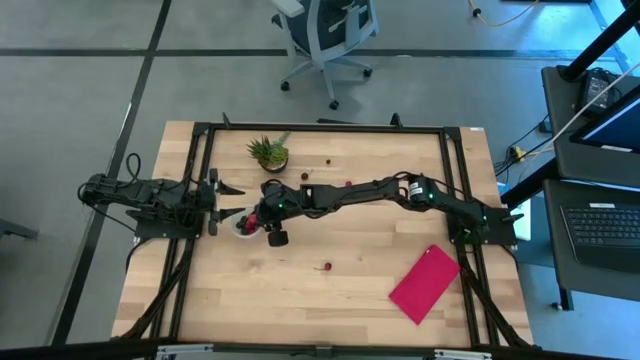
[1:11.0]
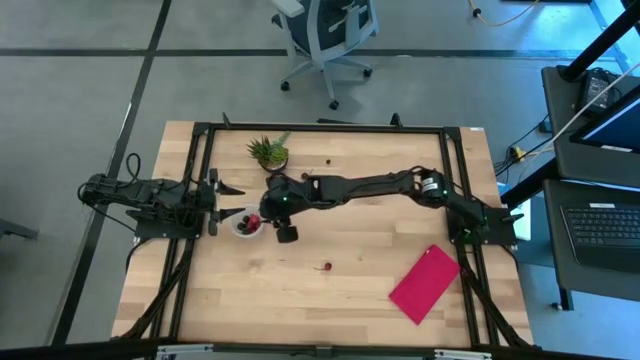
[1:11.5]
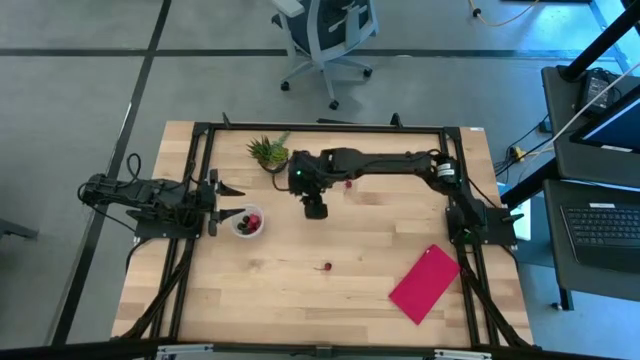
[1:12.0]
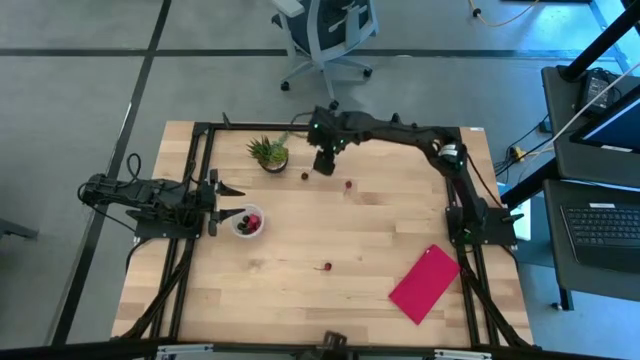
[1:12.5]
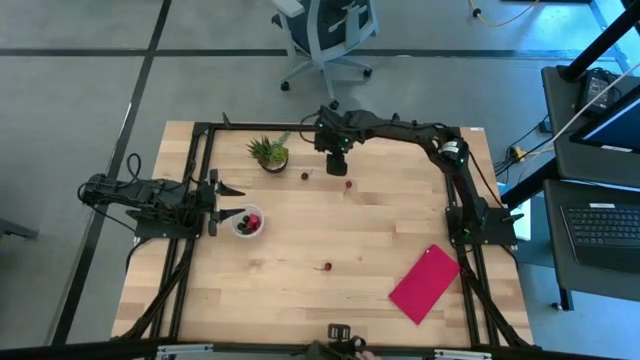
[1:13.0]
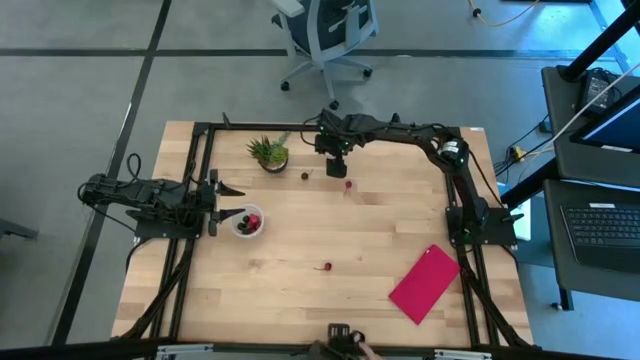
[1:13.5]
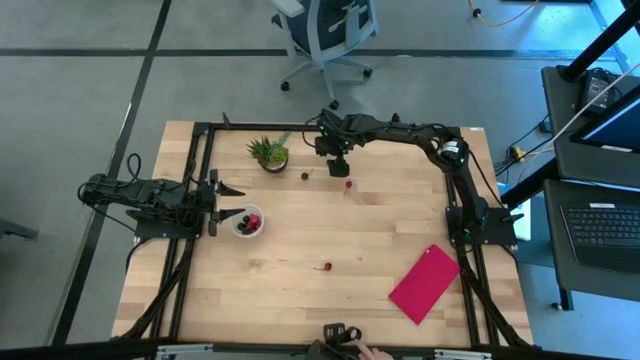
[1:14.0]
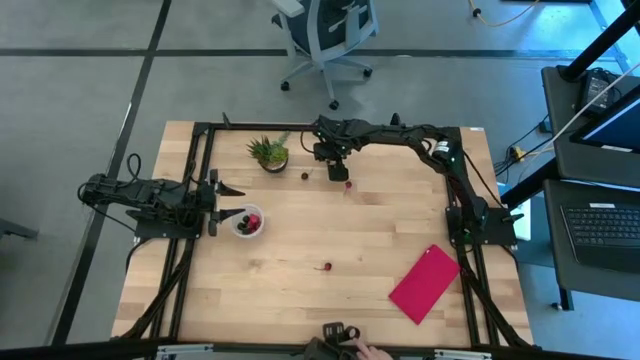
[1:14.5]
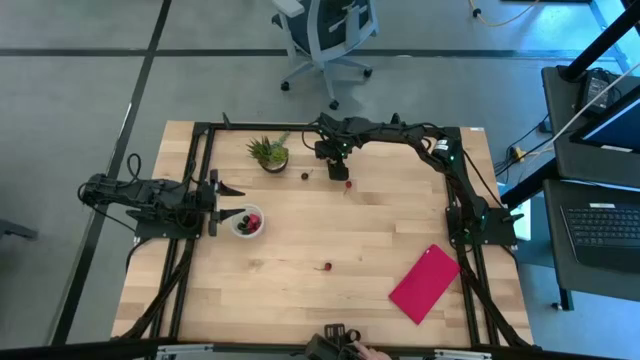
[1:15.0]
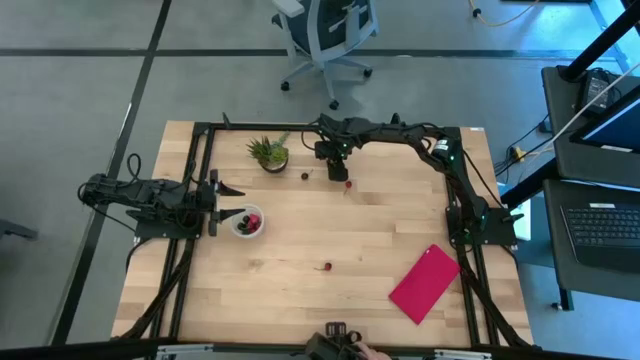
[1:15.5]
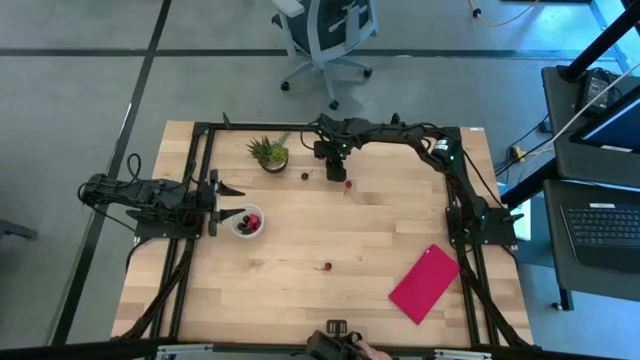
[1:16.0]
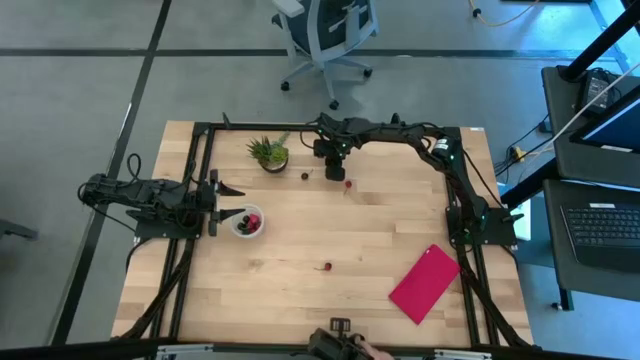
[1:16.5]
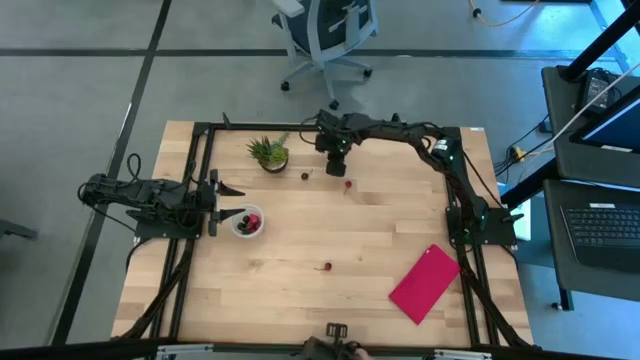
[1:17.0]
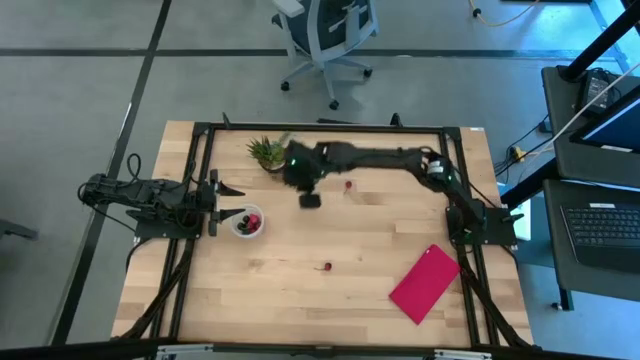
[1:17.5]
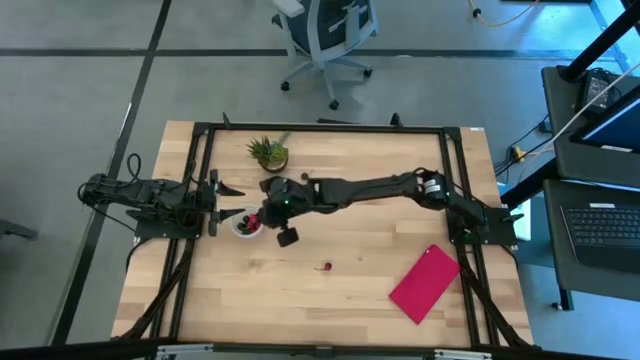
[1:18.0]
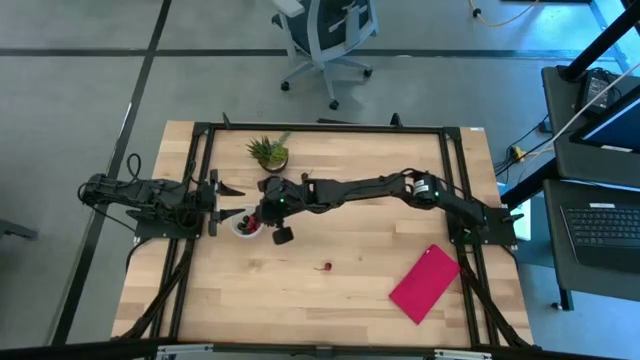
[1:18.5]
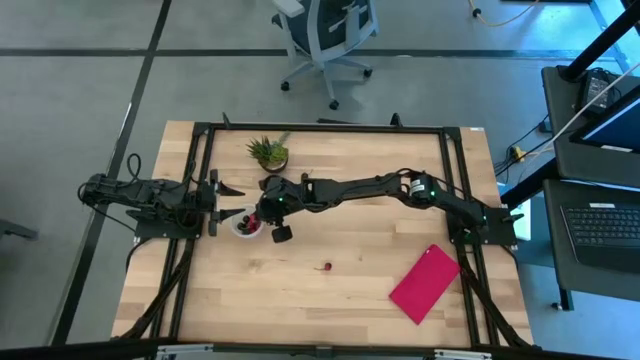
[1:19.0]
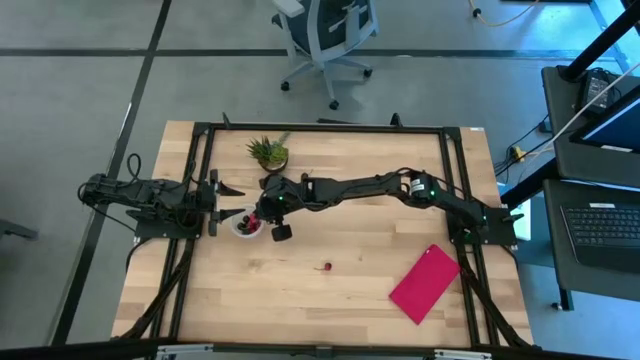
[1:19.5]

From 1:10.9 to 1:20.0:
Task: Pick and placing Produce into tupperware
Put the blueberry into the transparent container

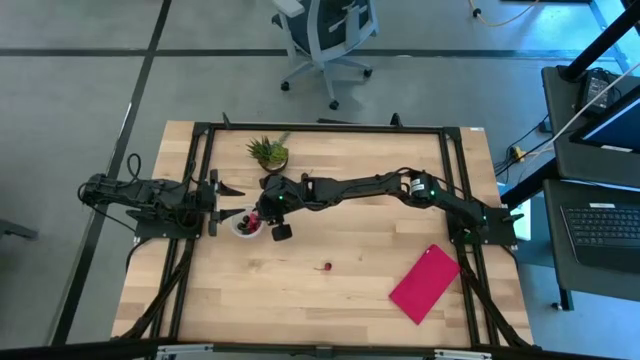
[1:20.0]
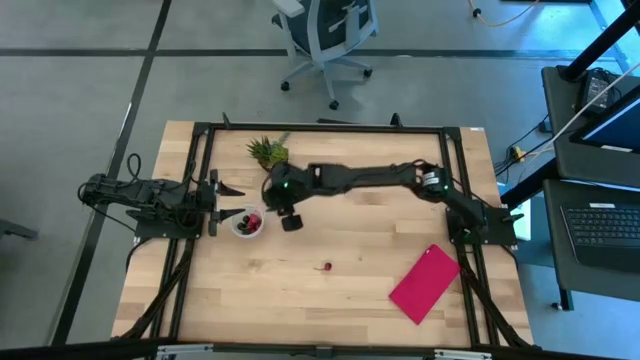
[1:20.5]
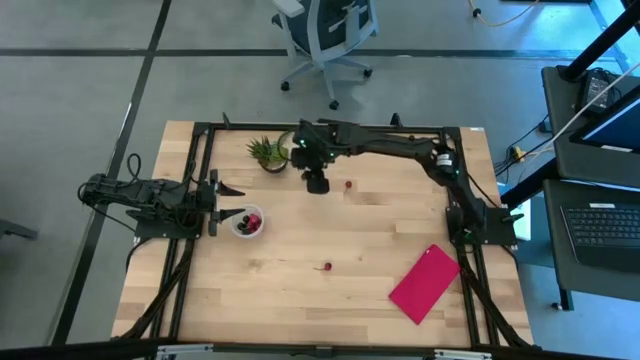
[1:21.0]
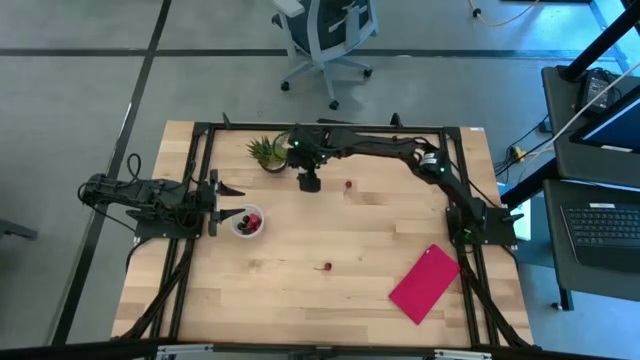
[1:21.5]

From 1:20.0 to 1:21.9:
Put the black cherry into the transparent container

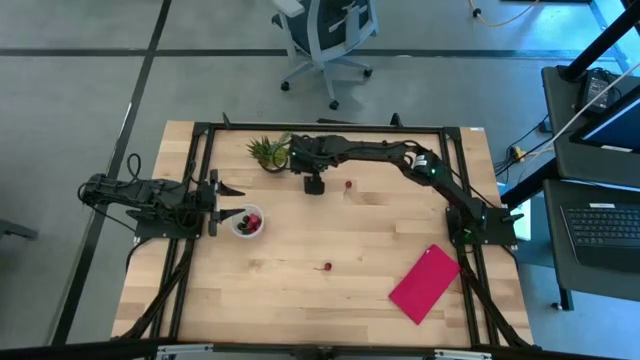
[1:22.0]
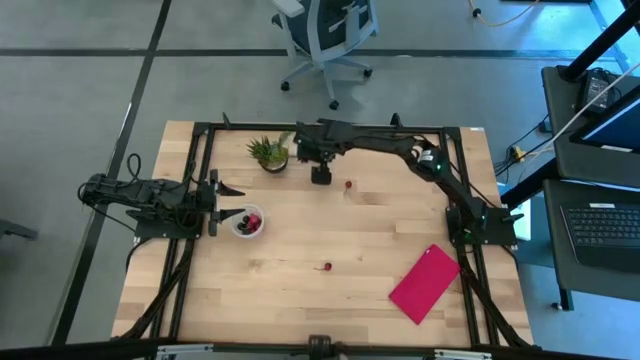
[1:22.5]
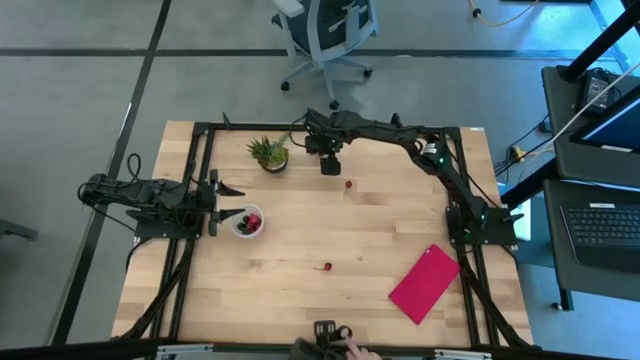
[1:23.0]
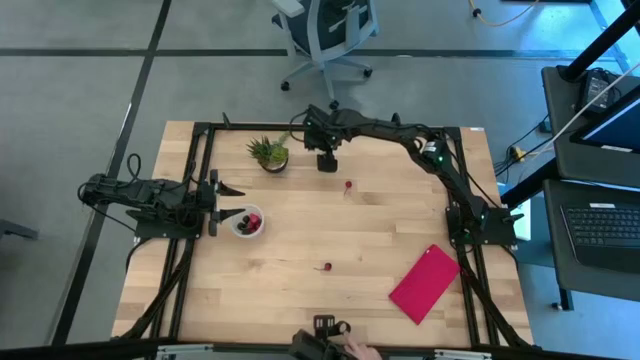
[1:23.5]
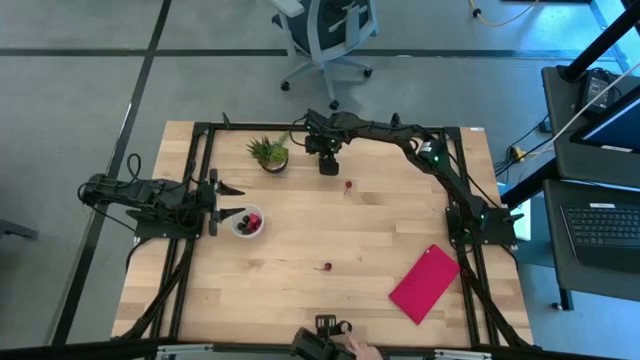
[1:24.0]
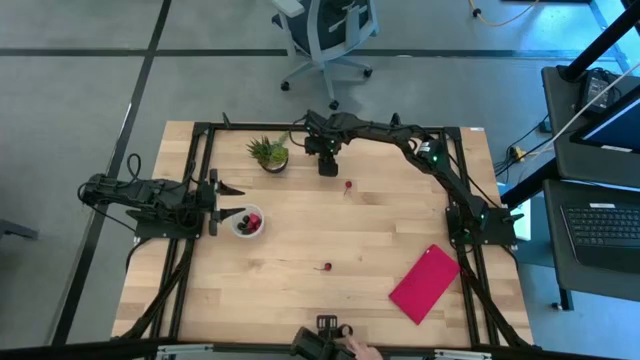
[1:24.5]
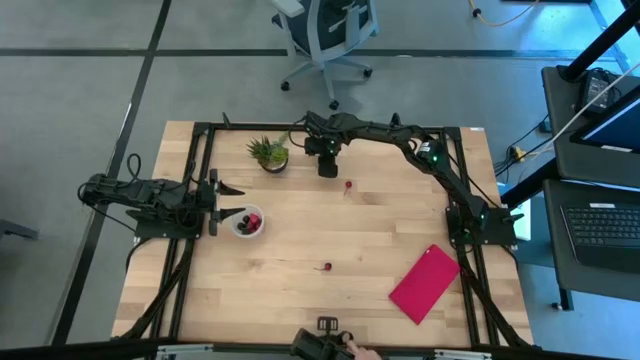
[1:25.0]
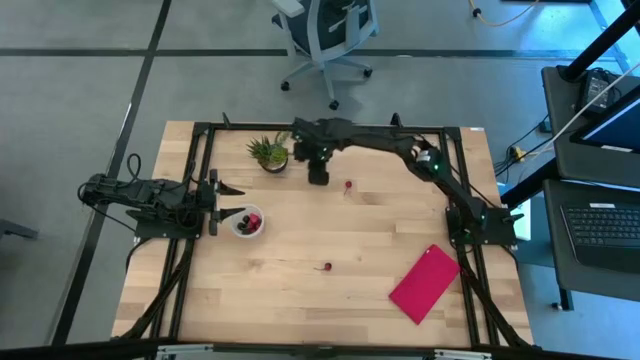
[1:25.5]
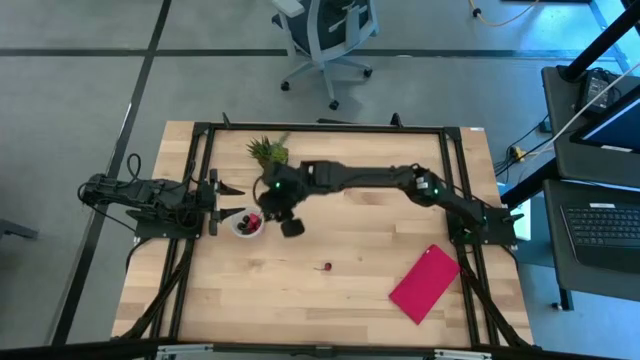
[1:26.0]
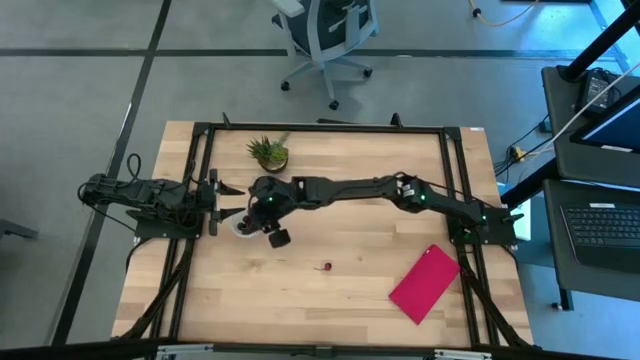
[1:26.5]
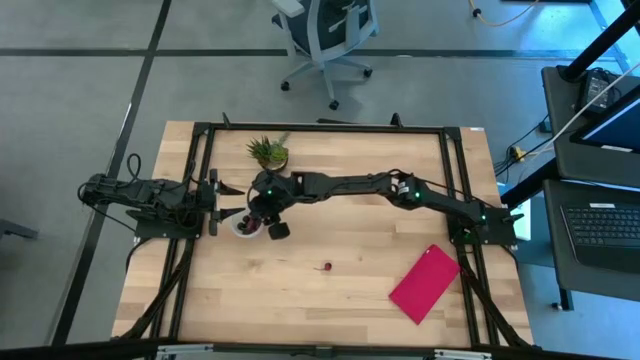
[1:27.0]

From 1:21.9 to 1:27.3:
Put the black cherry into the transparent container

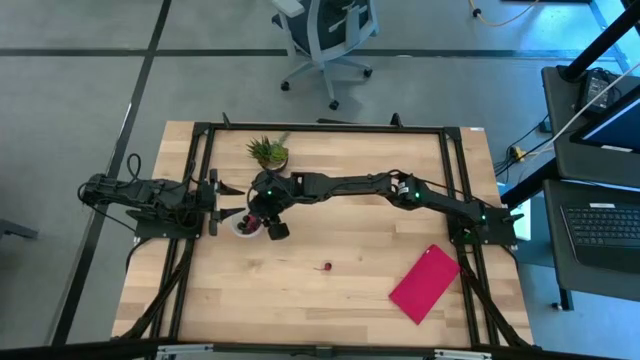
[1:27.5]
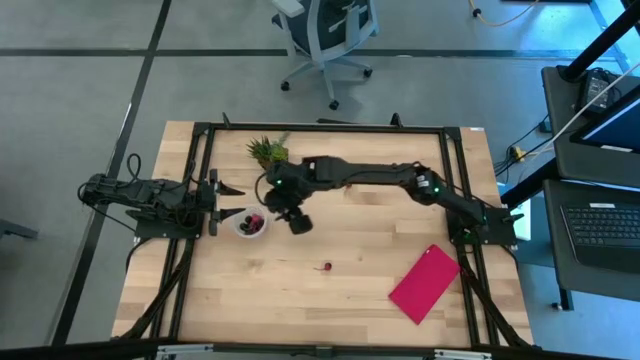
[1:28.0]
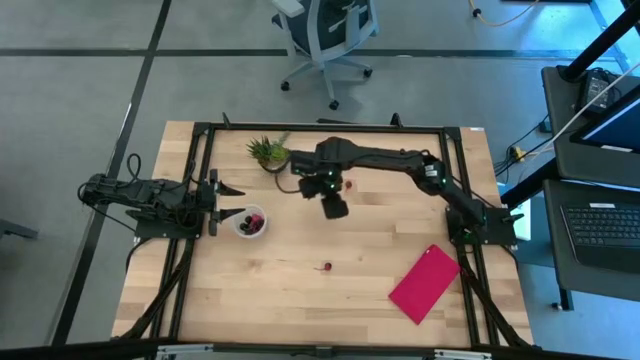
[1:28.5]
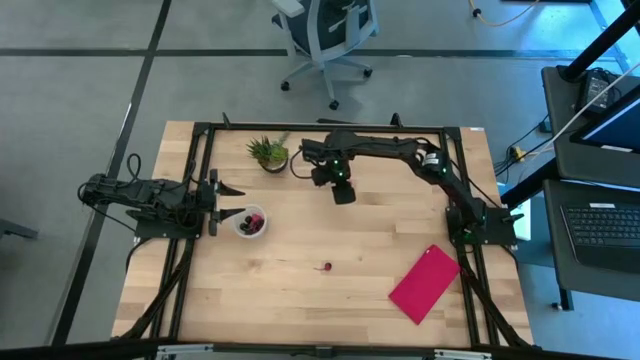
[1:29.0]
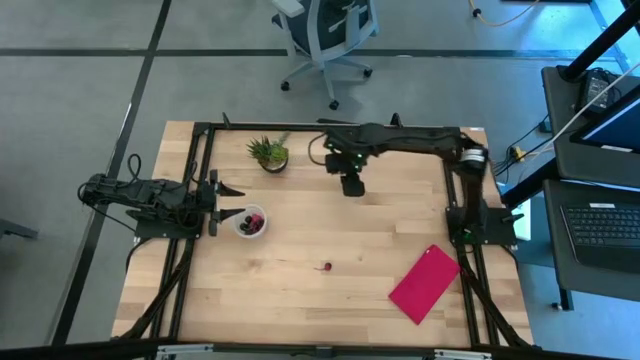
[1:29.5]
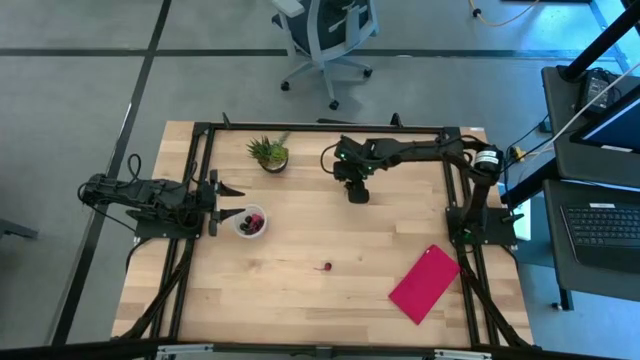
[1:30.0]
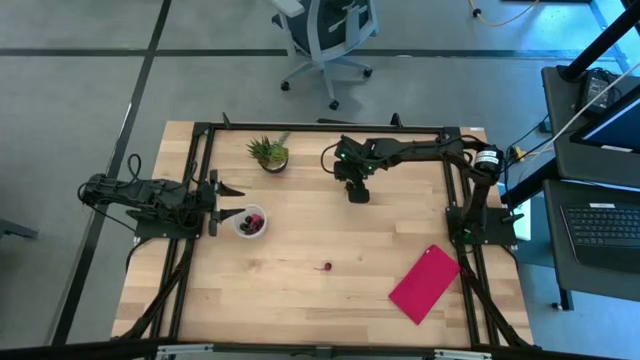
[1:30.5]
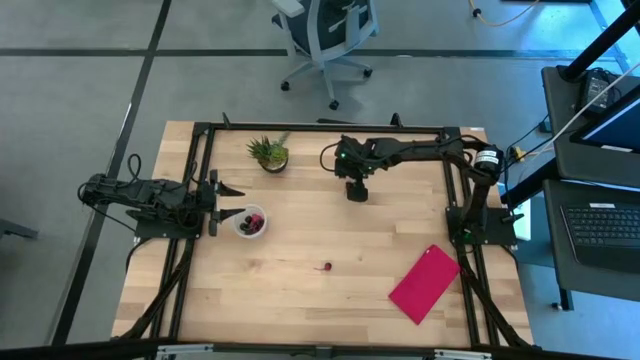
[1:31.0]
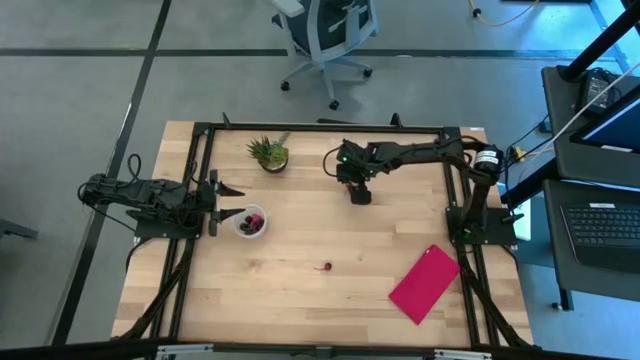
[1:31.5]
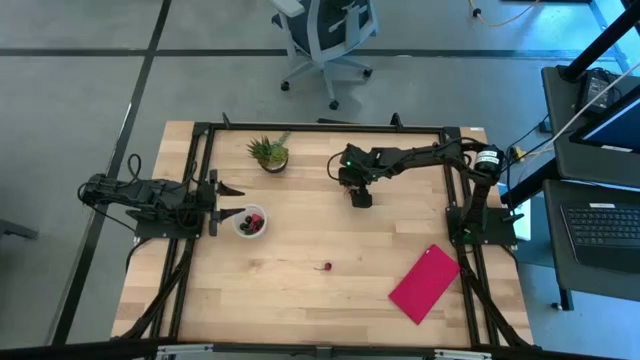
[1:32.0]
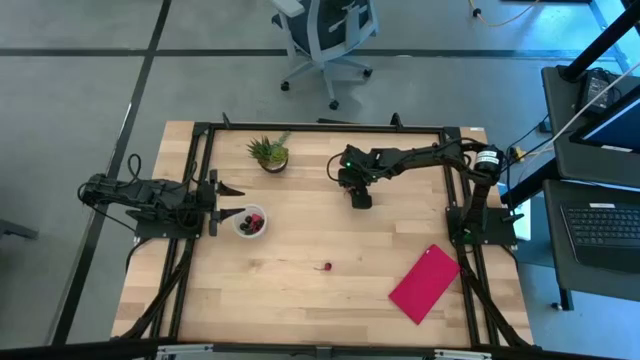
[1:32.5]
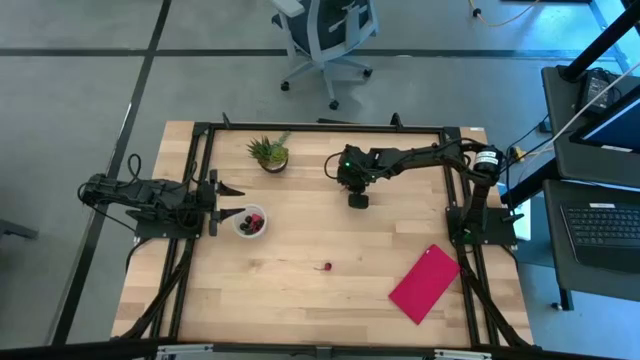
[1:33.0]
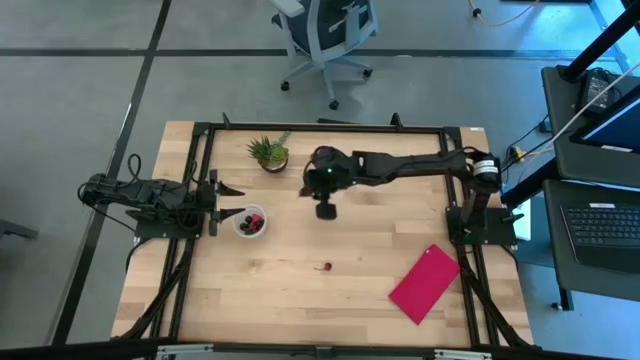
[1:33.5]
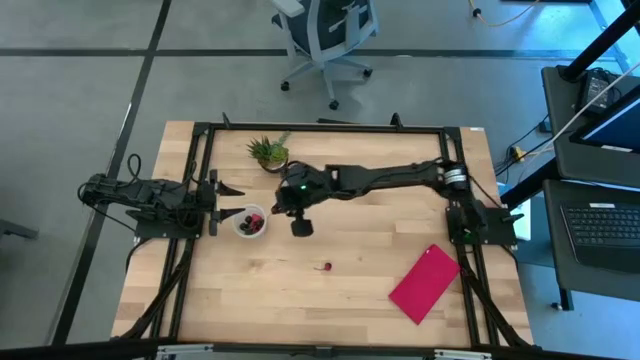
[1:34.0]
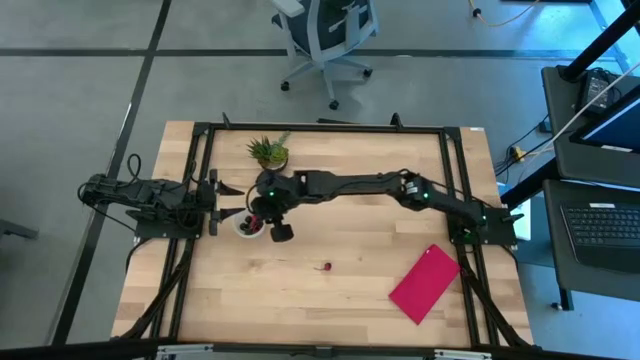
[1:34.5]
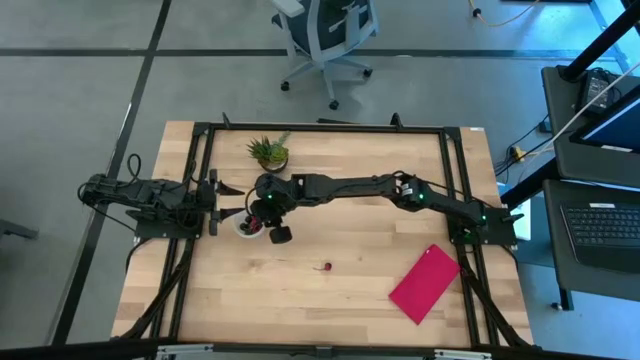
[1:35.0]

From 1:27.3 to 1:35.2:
Put the red cherry into the transparent container
